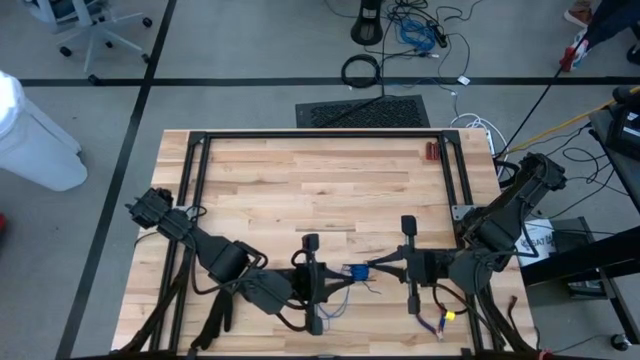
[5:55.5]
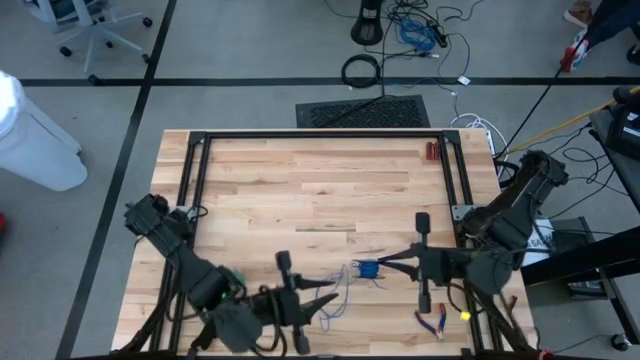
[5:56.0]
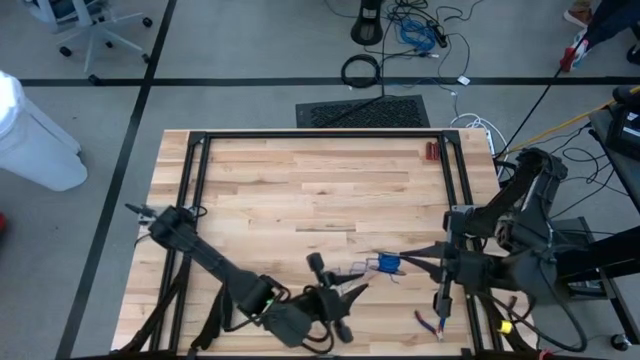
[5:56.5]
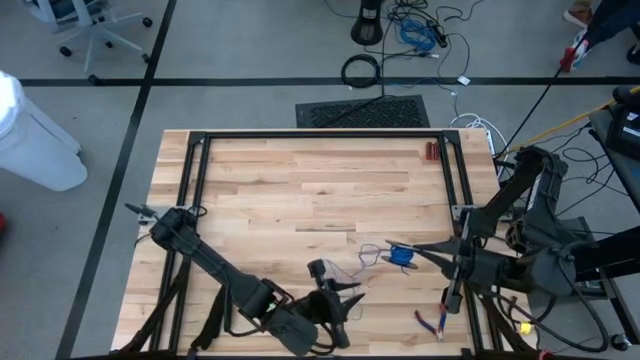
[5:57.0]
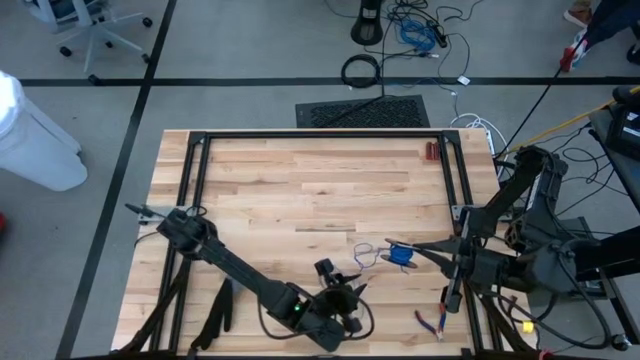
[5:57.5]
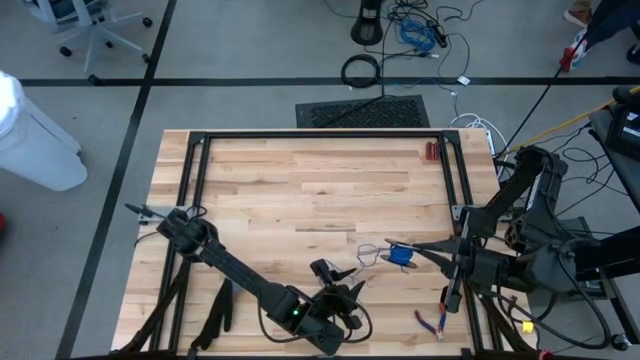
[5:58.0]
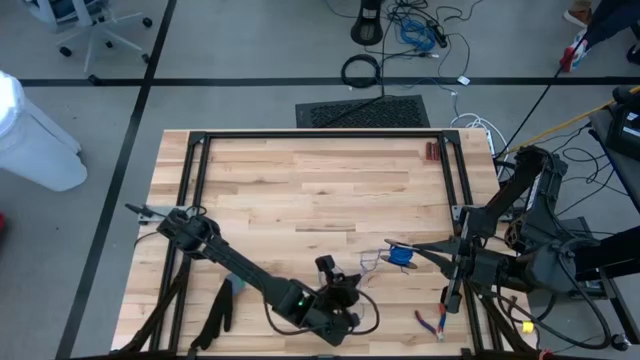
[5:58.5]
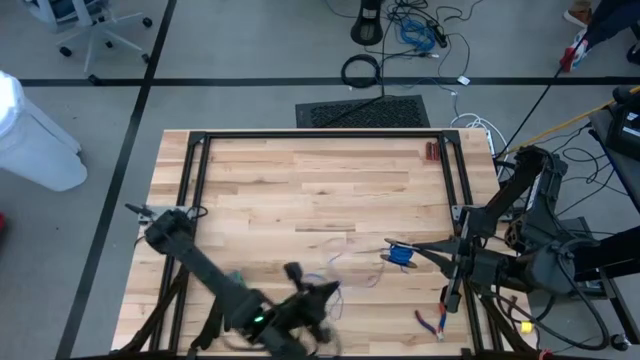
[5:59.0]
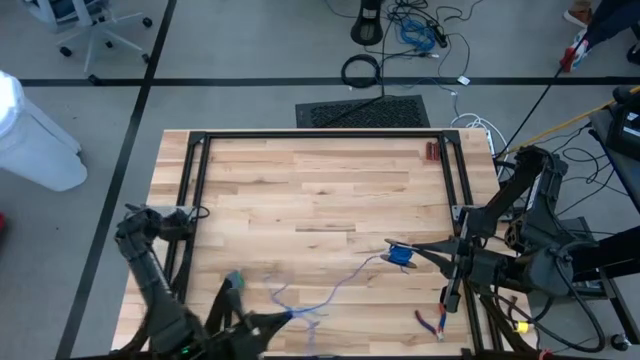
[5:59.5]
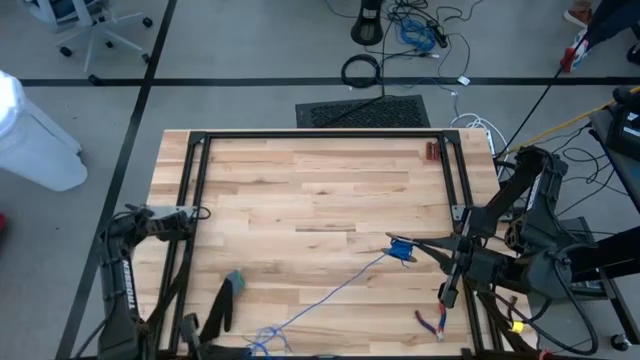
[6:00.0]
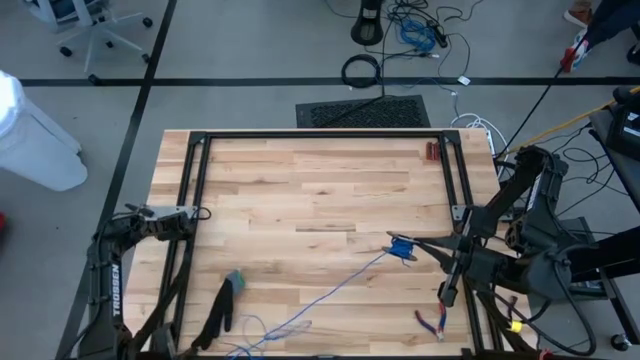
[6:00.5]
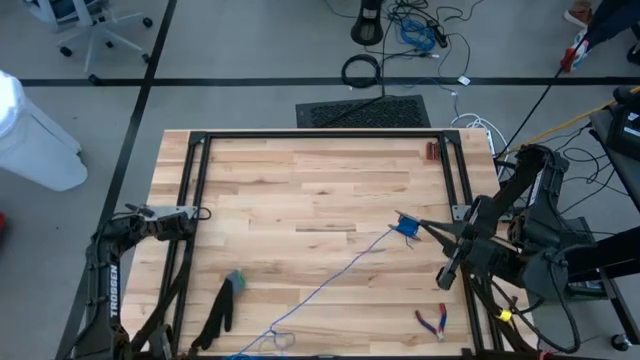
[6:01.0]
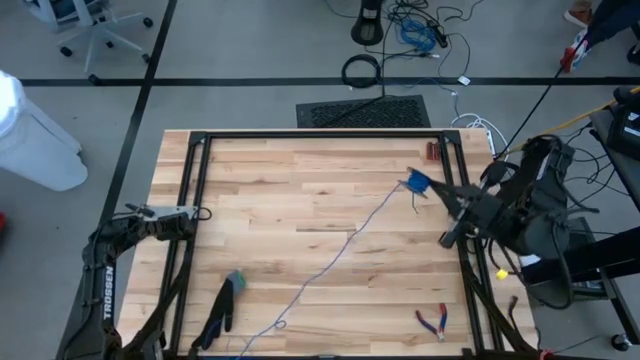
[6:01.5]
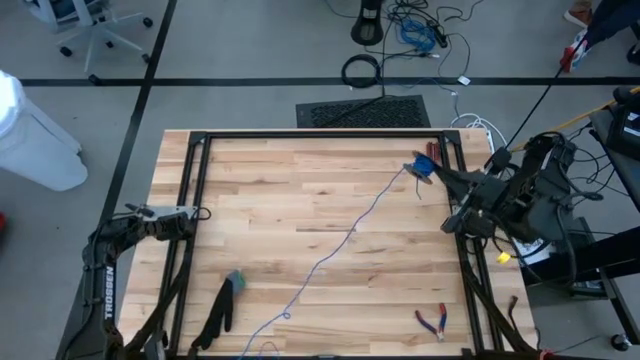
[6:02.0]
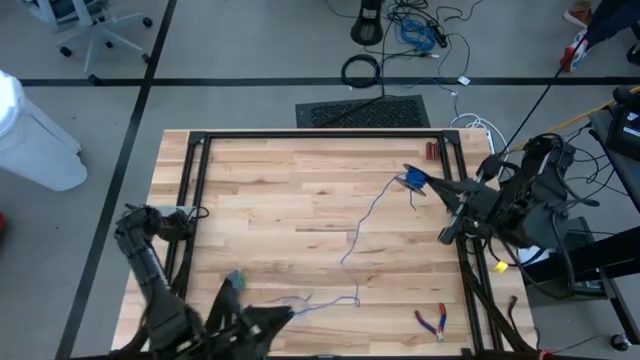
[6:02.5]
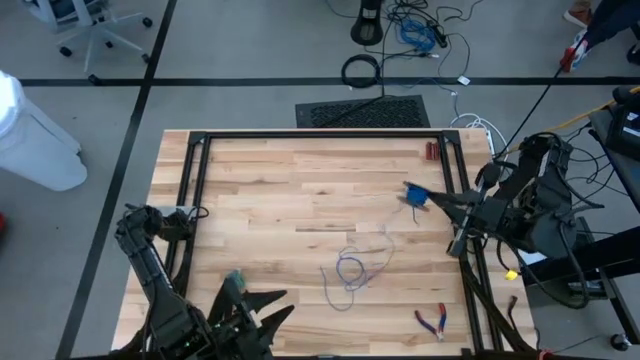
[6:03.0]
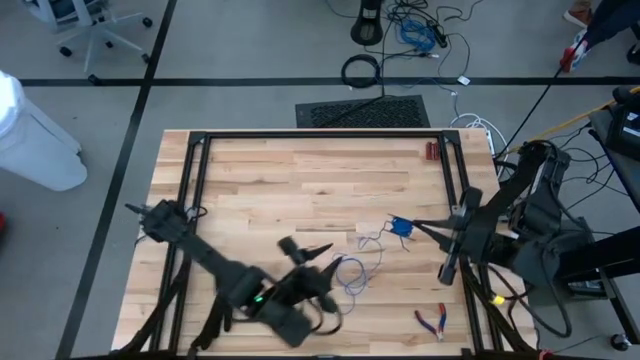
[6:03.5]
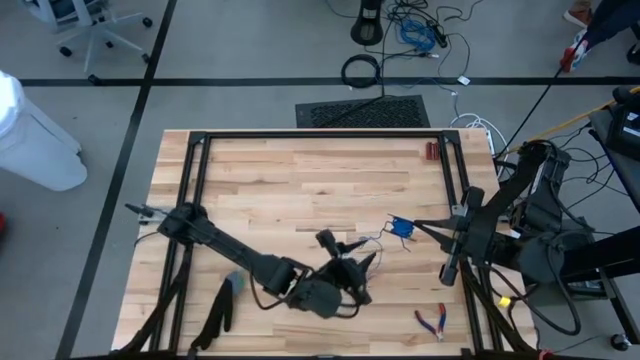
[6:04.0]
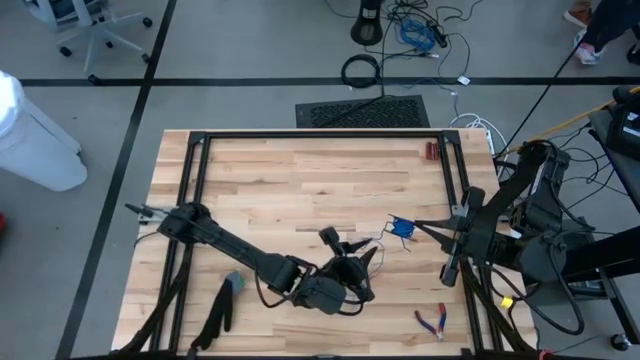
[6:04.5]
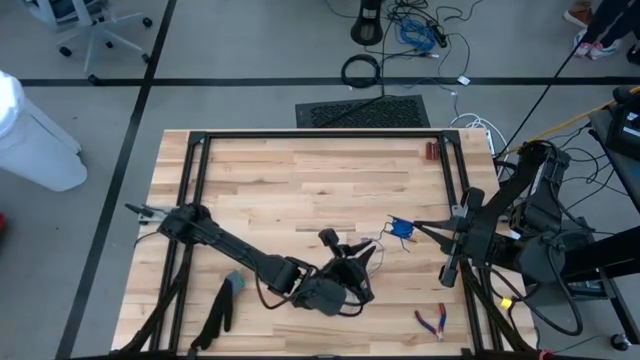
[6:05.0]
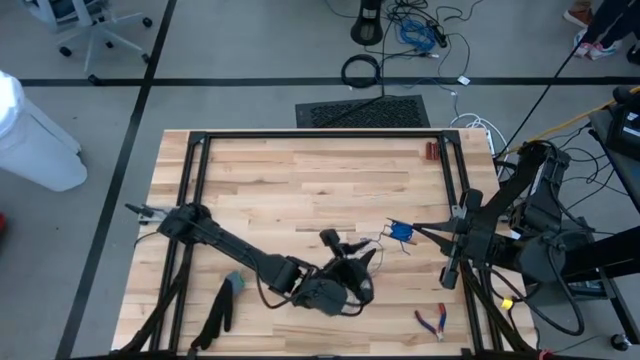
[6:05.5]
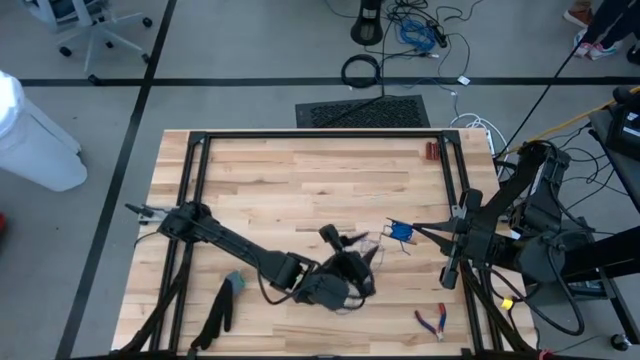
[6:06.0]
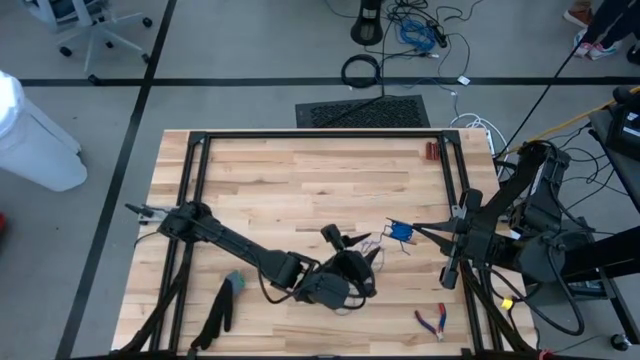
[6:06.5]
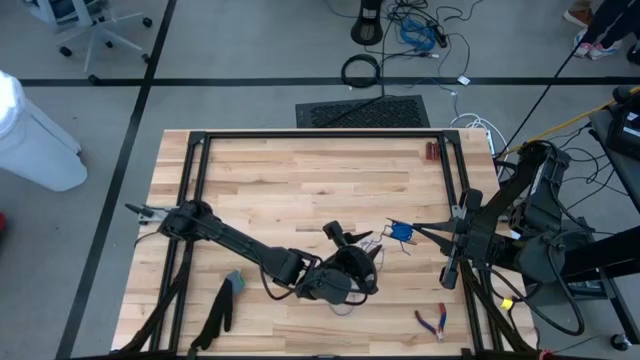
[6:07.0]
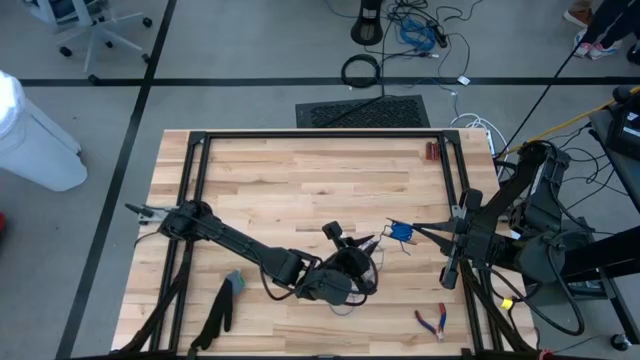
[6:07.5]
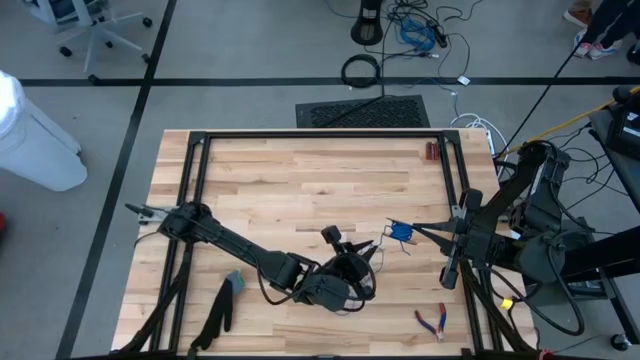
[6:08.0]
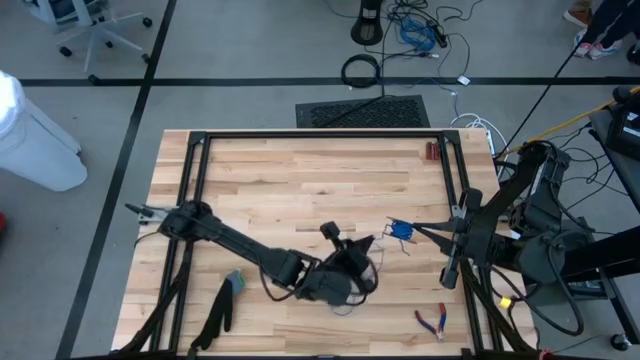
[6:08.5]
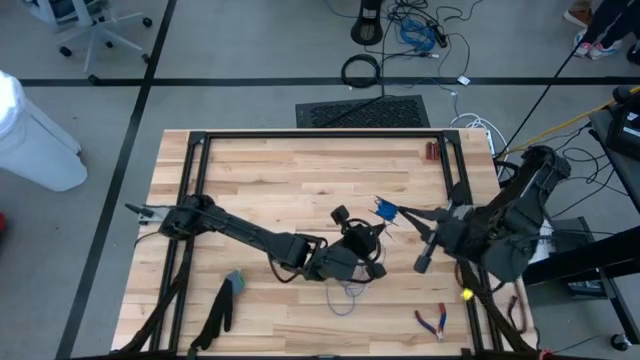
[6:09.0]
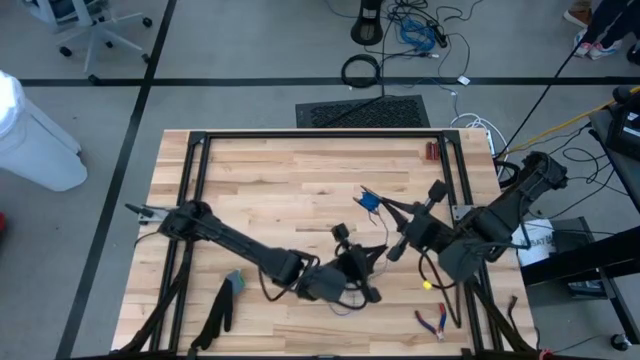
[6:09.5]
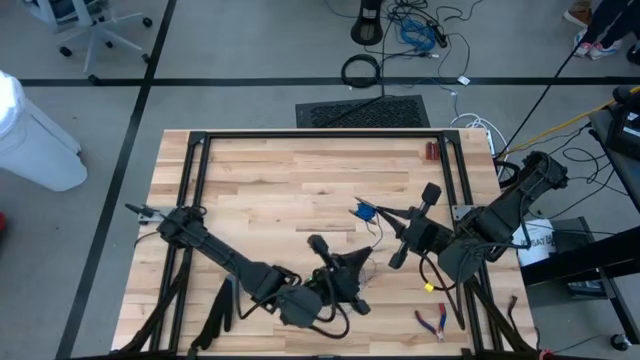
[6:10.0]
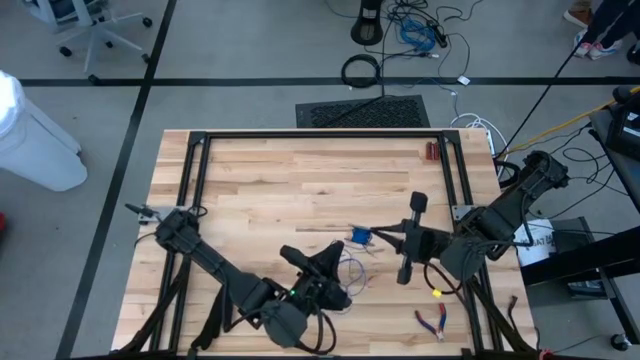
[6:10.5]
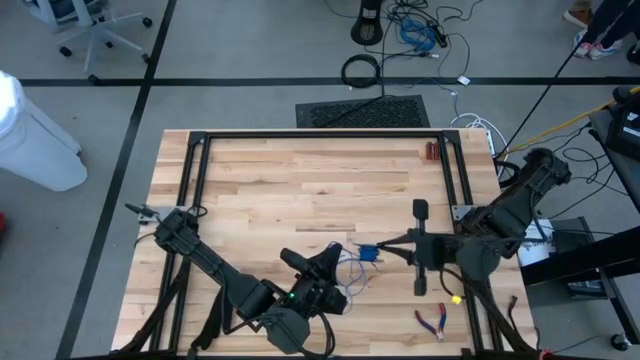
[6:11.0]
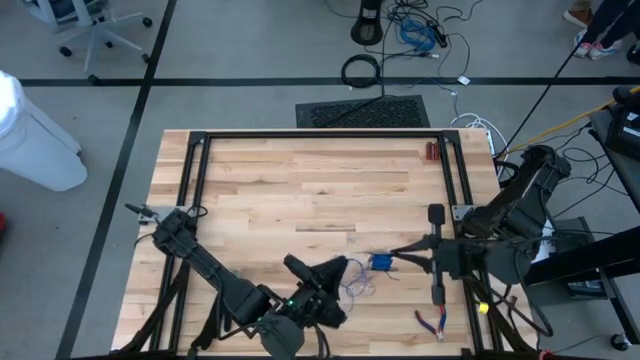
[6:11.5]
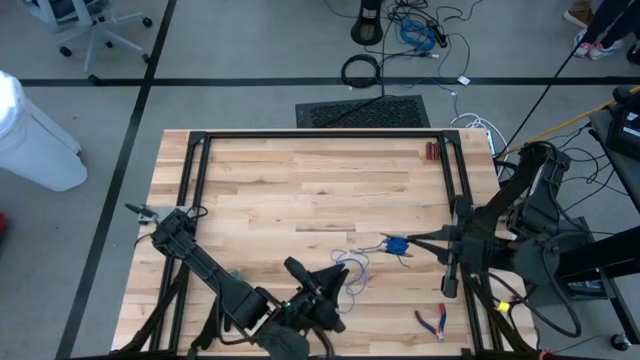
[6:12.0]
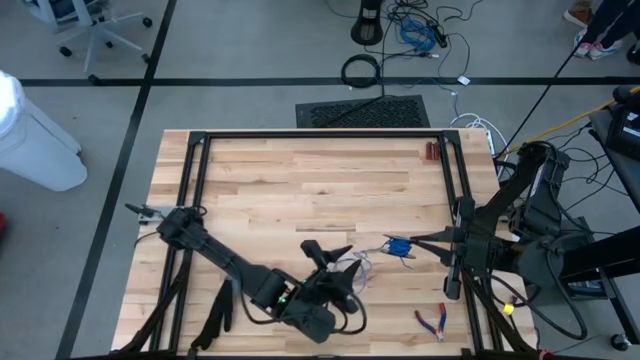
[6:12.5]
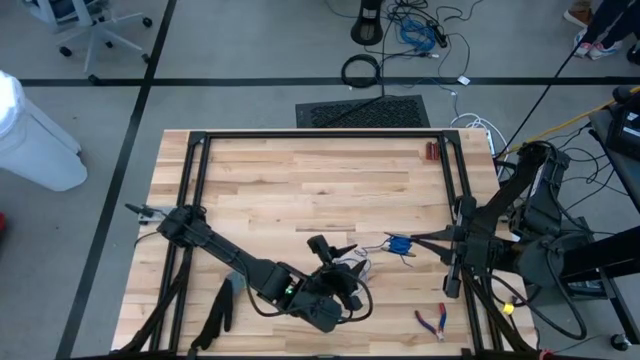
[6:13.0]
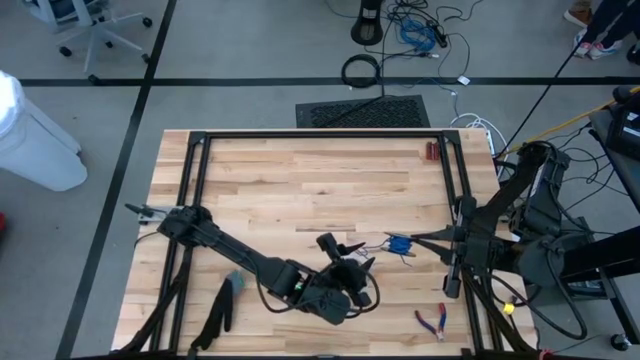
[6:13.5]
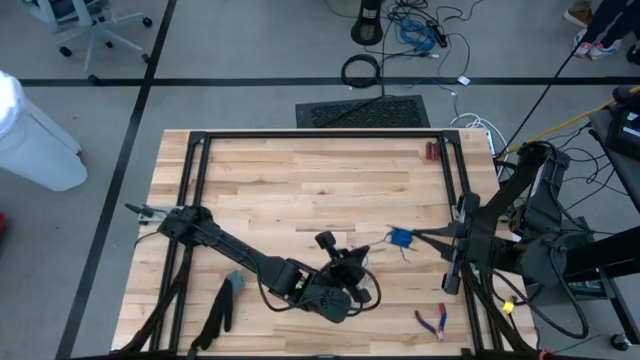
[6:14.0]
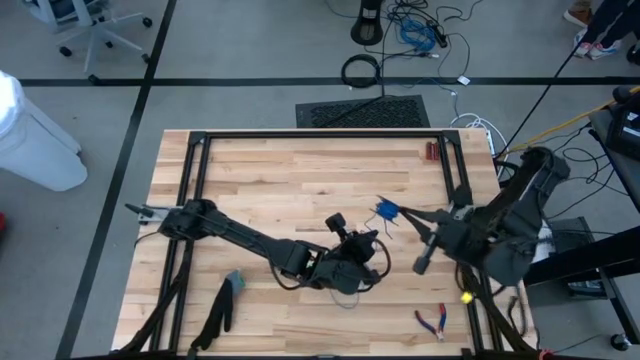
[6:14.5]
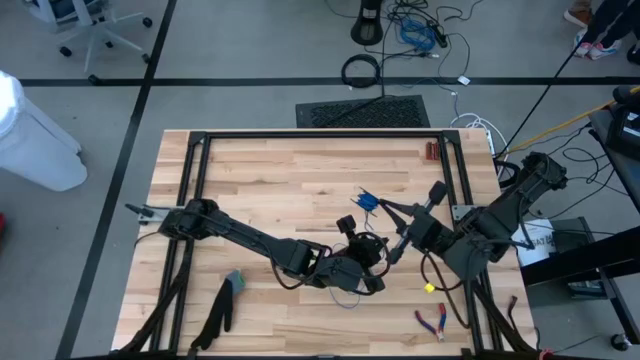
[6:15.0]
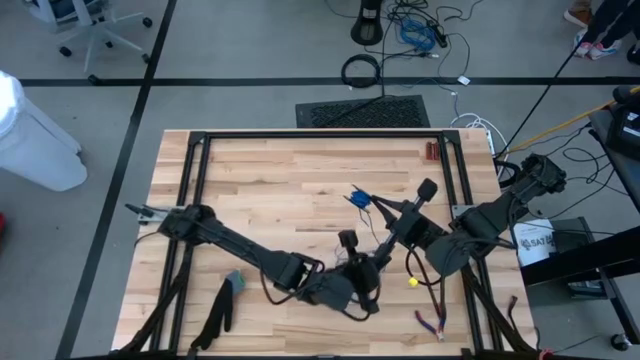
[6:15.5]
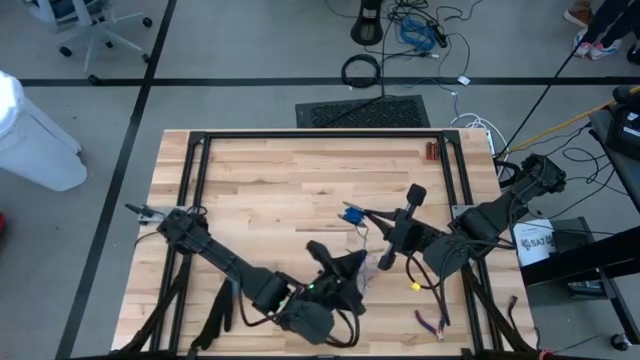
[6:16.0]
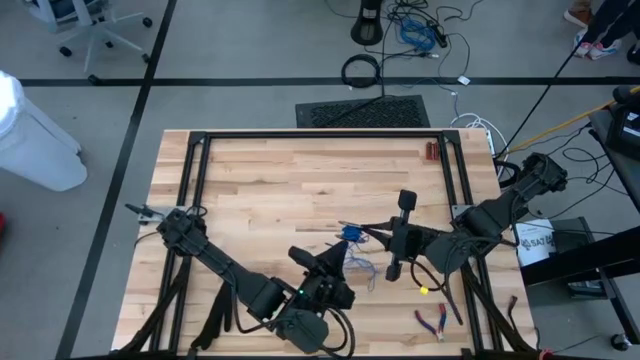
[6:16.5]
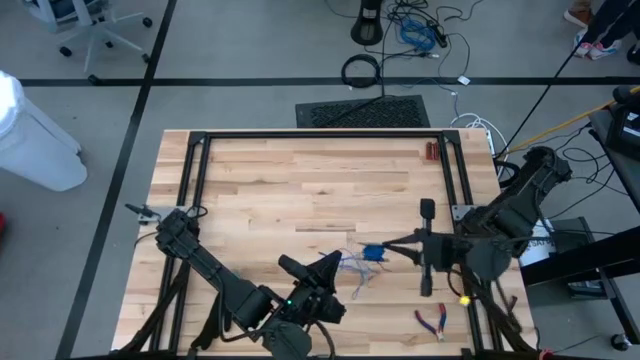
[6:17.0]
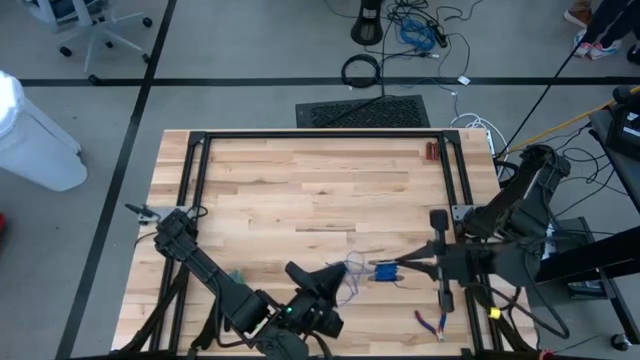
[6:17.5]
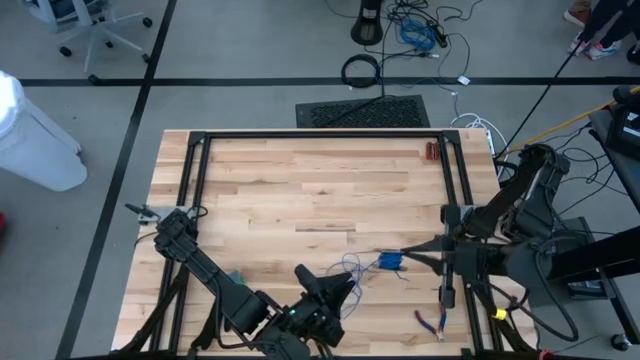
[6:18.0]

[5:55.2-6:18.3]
Task: Coil cords
Coil the blue wire onto the black spool
